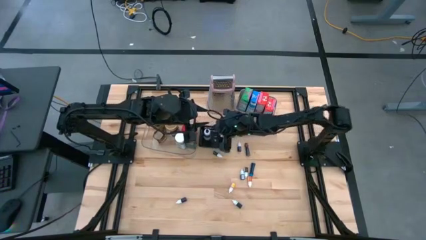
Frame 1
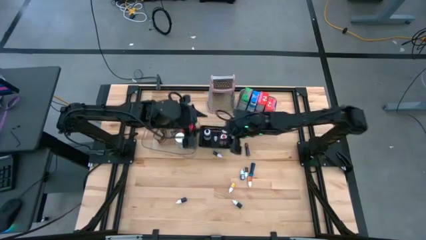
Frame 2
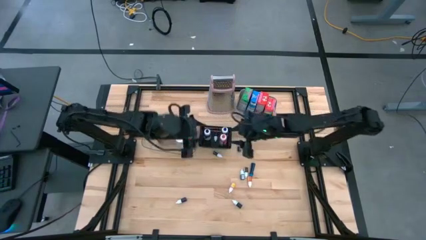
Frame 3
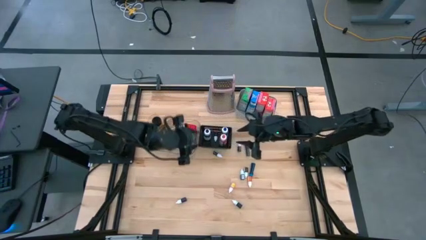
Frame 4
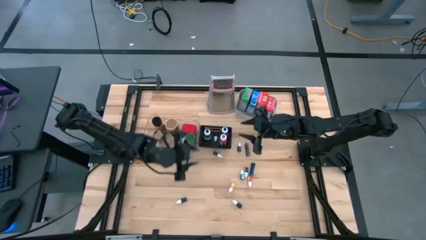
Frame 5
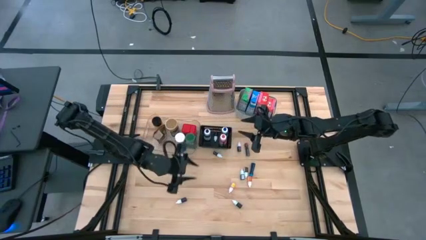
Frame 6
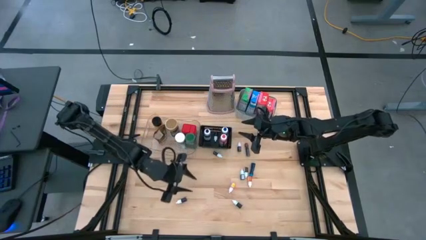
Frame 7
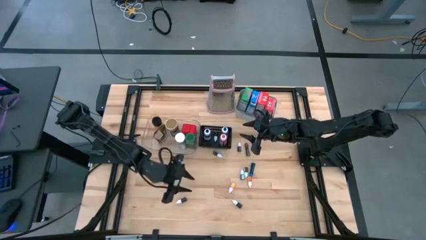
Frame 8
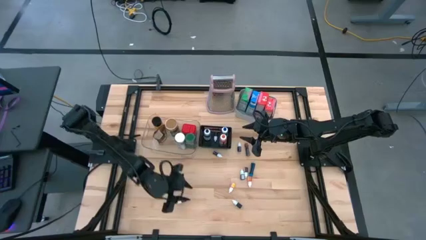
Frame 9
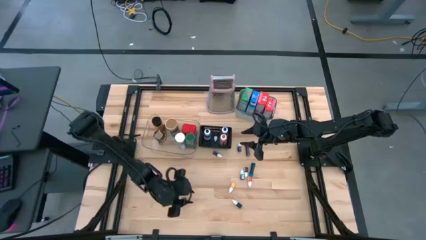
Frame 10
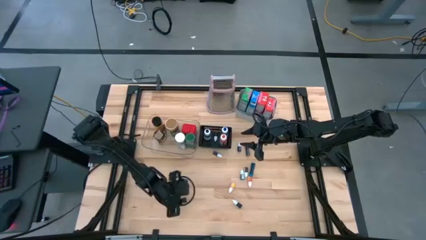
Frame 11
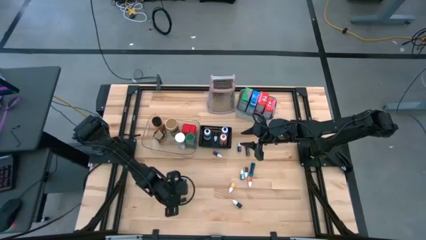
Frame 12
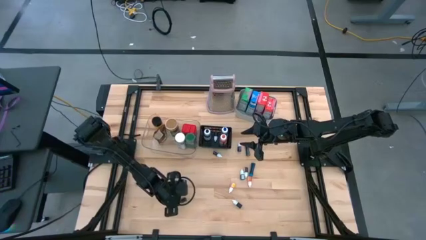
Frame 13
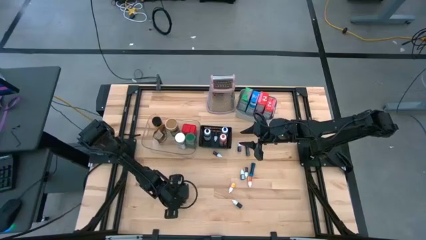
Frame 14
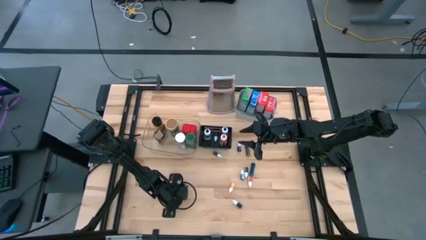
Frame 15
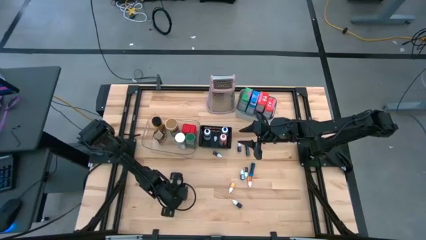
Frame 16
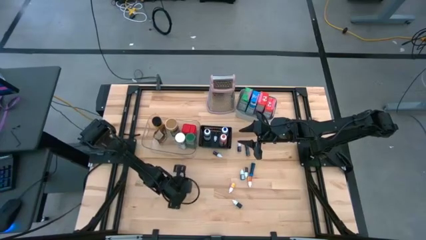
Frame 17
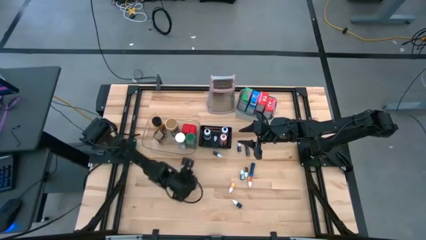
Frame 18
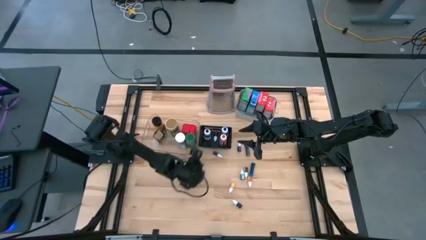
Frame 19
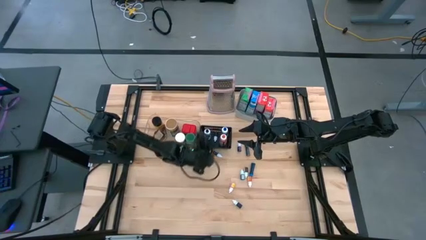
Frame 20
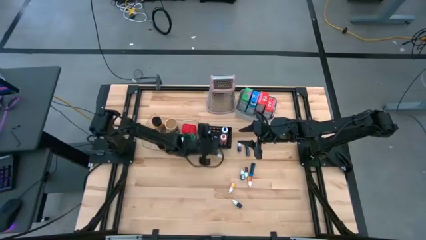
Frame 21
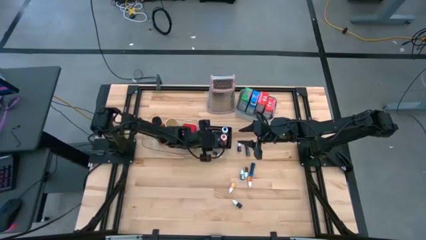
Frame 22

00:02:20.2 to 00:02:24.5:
Task: Pick & Place Kitchen Items
Put the small red food coloring bottle into the black bin

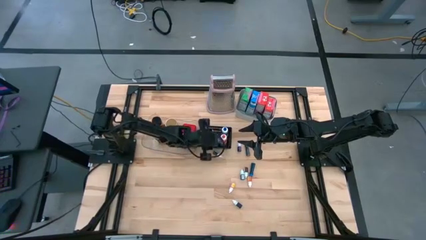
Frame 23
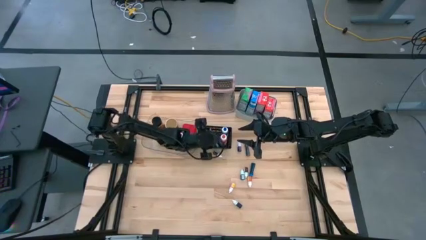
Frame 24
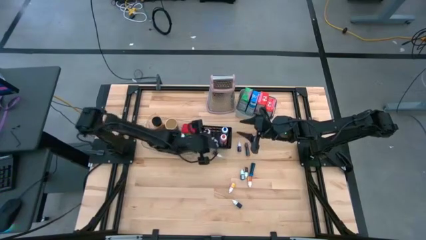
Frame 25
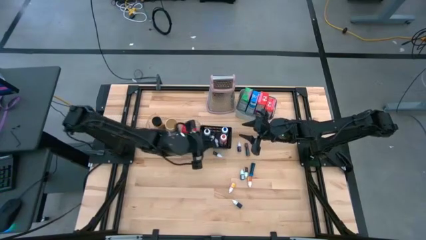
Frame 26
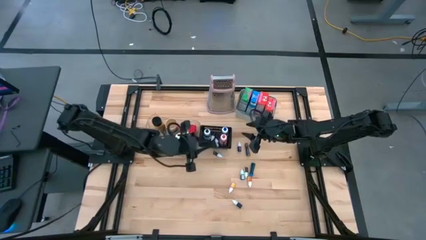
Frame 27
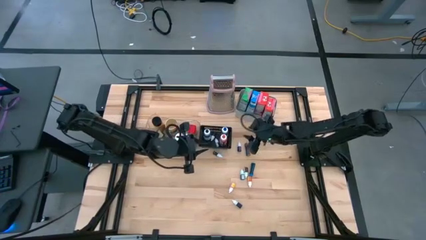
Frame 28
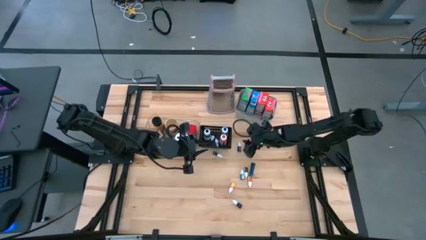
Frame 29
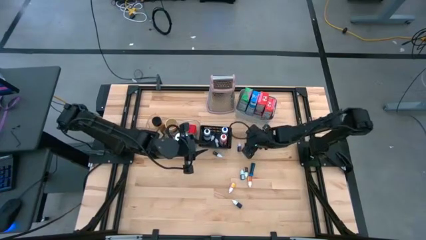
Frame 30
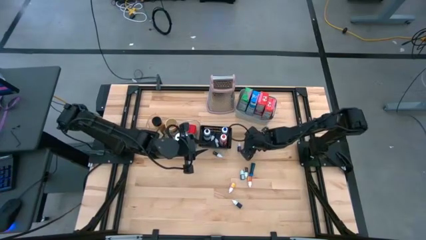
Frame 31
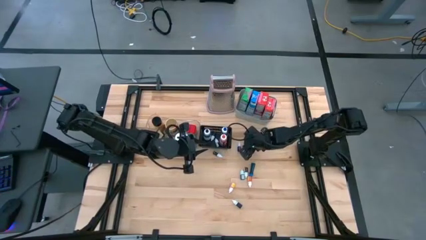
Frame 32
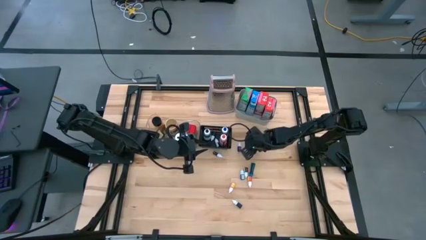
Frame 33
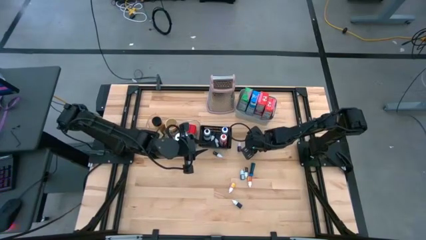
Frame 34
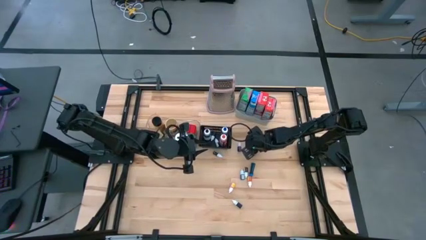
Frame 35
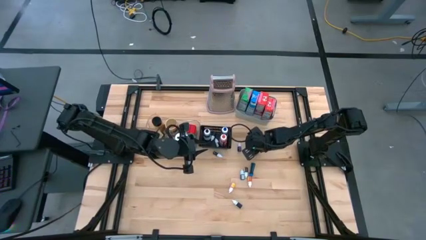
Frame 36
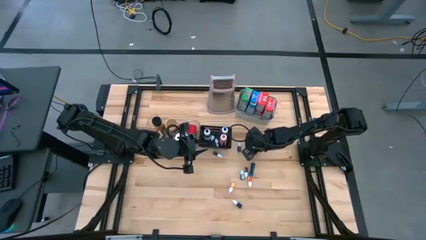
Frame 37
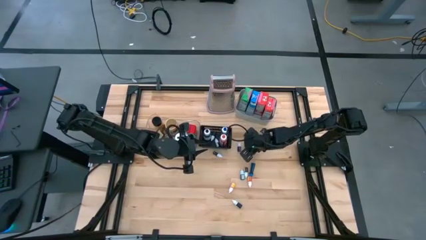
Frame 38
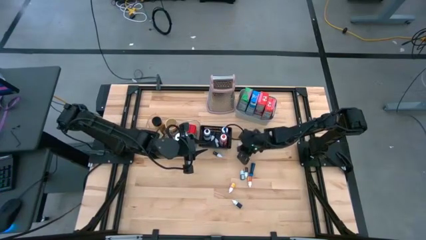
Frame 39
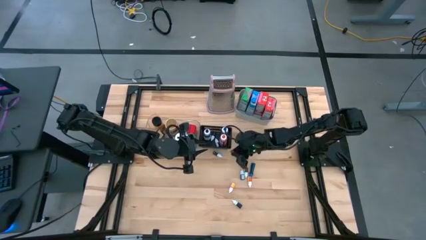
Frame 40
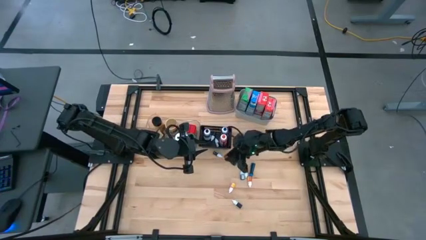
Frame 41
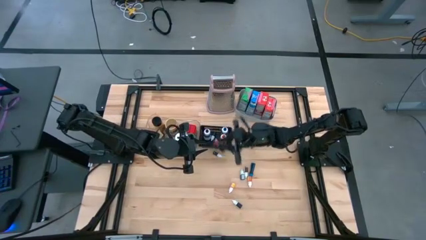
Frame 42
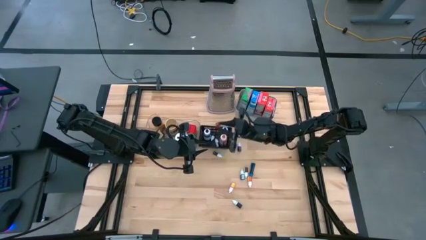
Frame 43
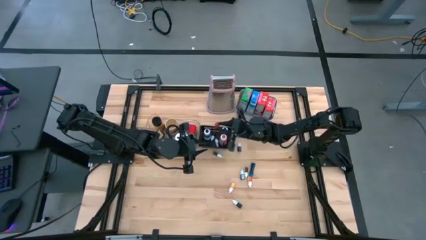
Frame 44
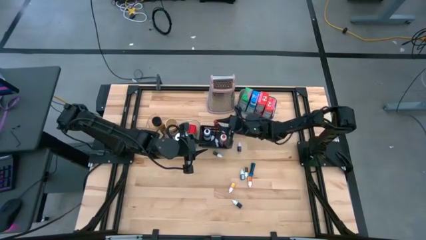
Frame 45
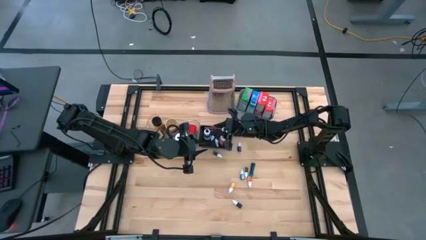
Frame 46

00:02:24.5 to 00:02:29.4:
Put the small red food coloring bottle into the black bin

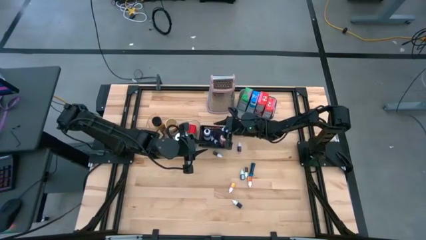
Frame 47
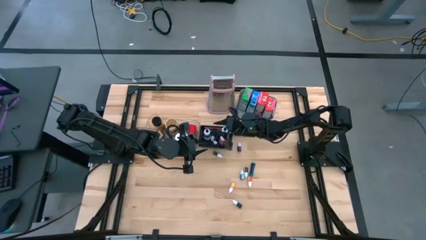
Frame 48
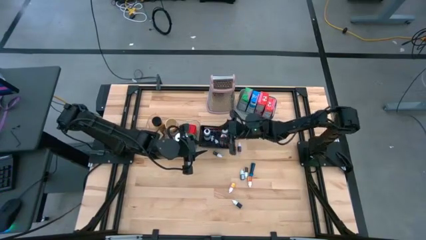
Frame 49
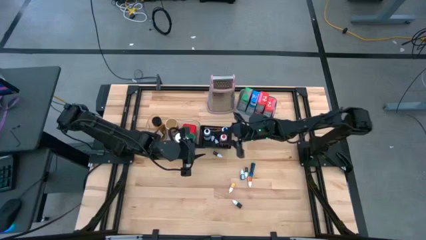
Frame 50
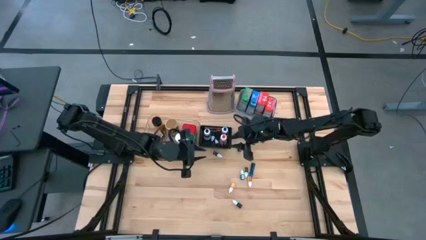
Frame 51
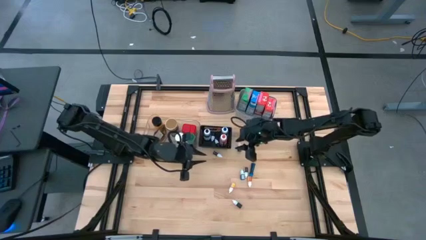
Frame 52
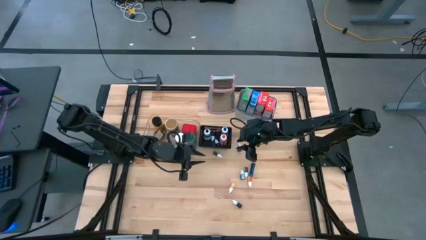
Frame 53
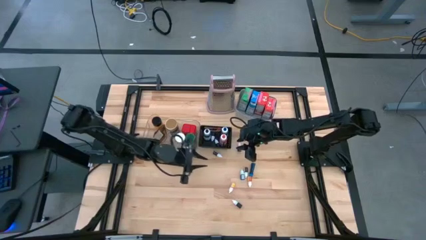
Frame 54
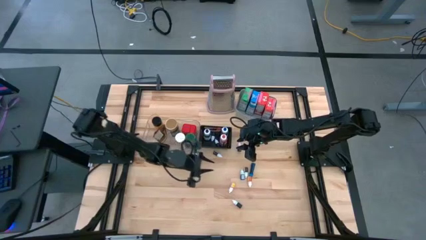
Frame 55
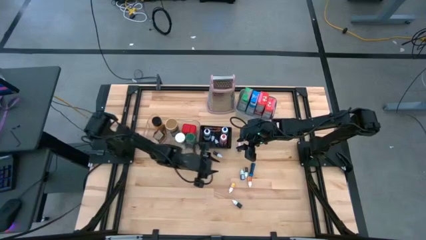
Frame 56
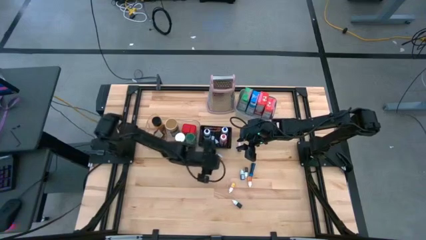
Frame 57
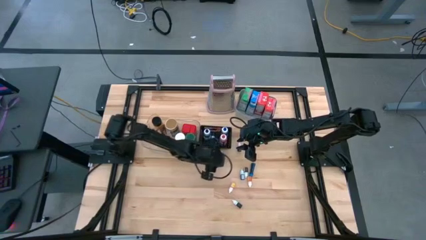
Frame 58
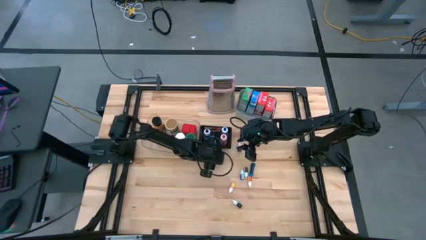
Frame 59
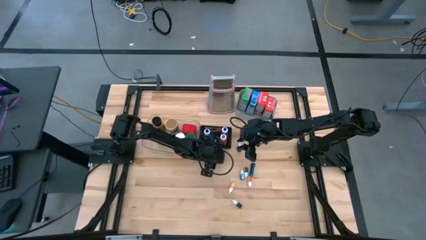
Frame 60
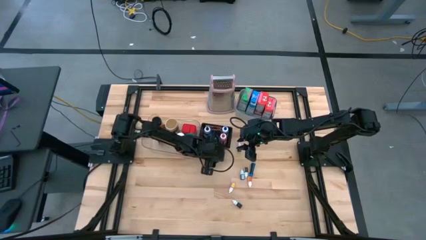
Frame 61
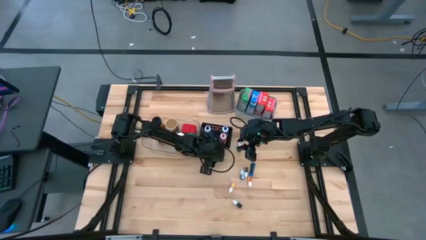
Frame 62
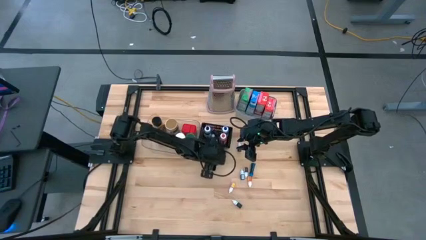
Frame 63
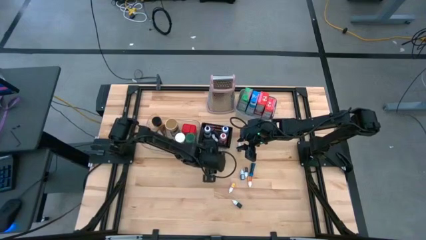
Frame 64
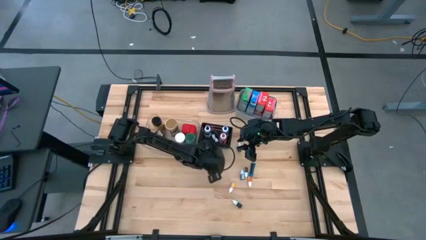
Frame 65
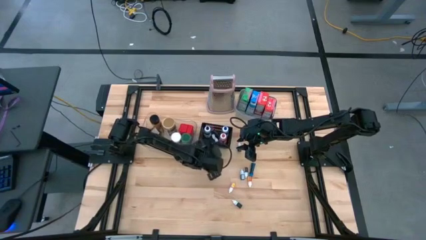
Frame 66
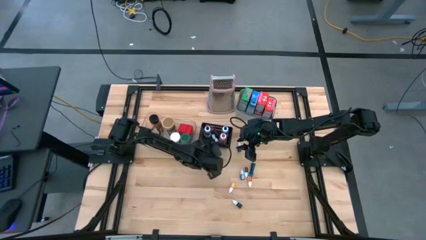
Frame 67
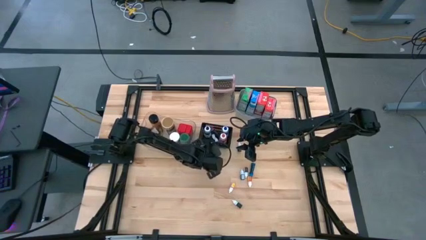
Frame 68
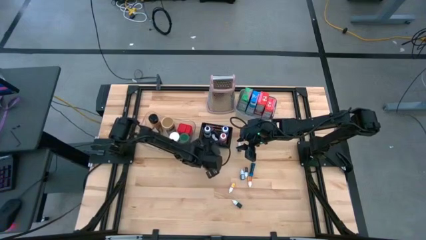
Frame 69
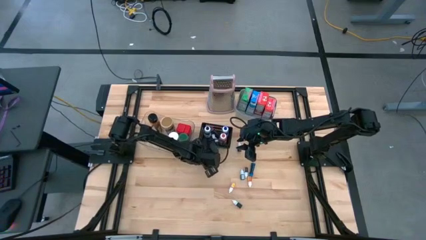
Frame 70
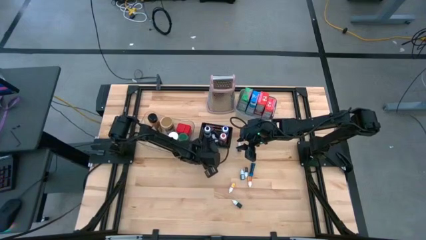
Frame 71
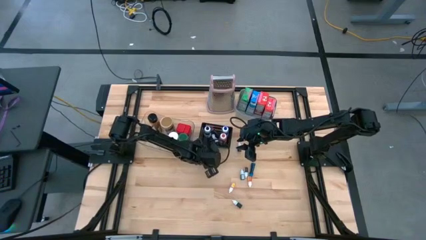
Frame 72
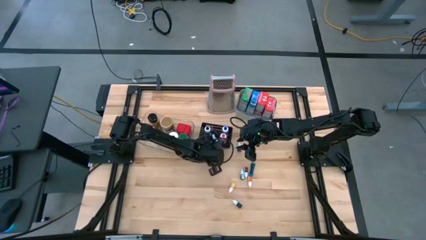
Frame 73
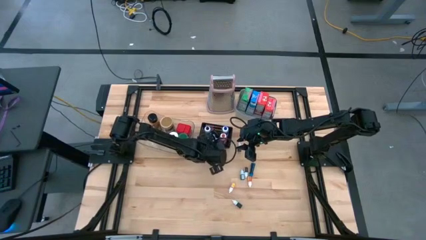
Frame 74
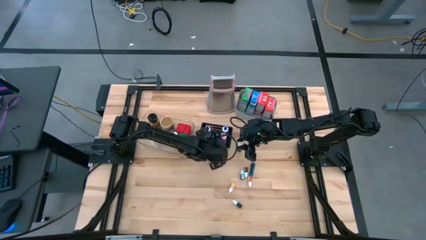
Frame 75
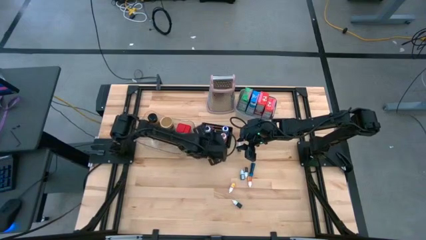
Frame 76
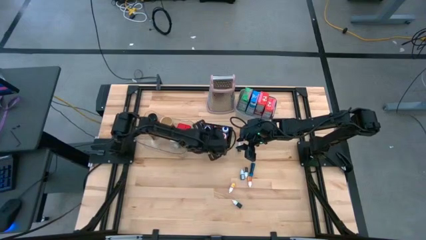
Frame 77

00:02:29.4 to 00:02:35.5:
Put the small red food coloring bottle into the black bin

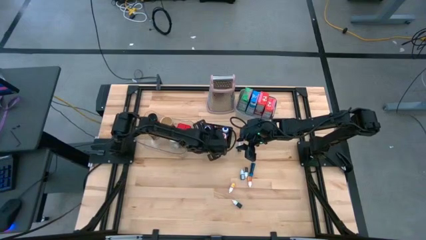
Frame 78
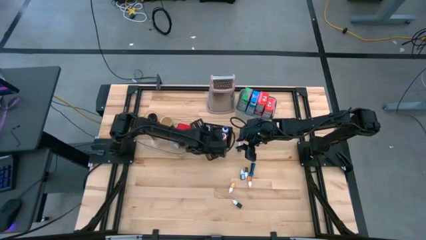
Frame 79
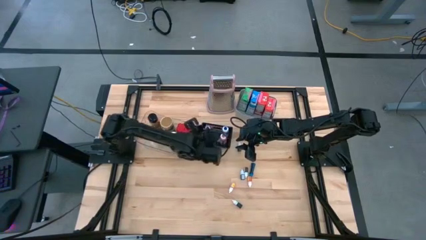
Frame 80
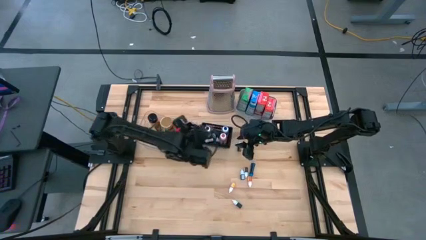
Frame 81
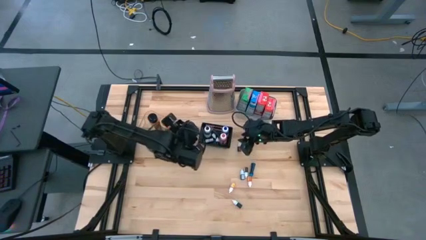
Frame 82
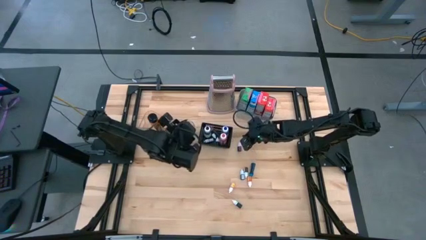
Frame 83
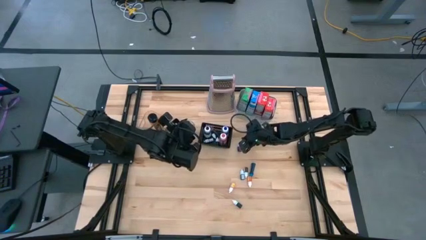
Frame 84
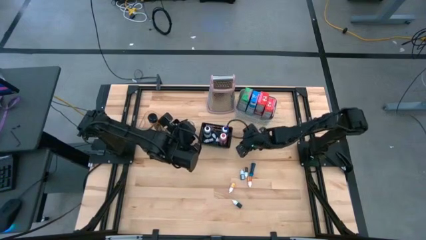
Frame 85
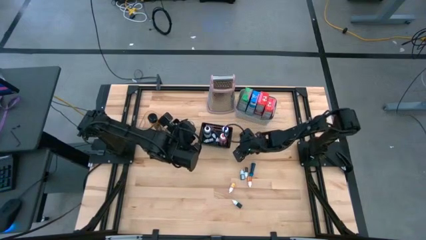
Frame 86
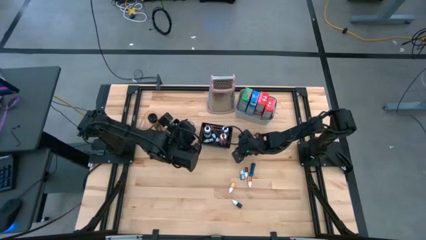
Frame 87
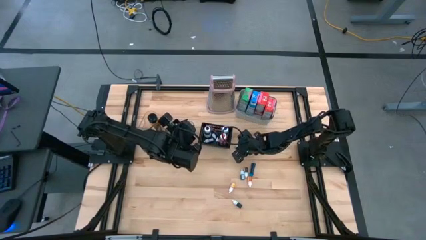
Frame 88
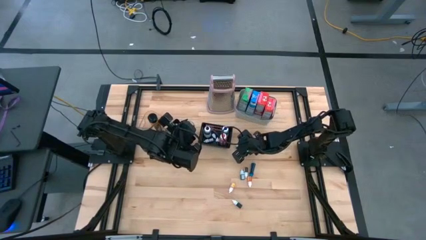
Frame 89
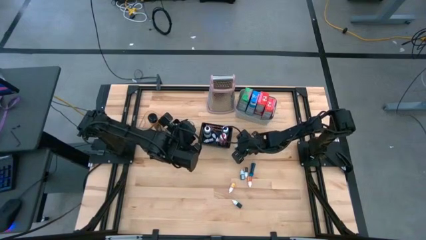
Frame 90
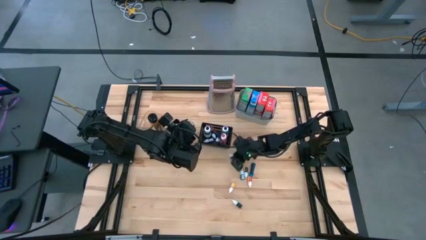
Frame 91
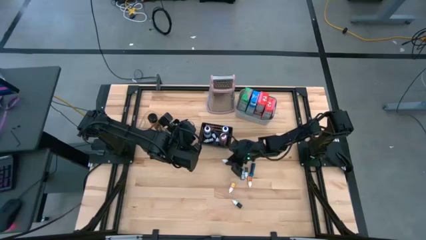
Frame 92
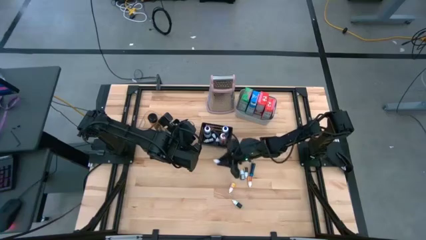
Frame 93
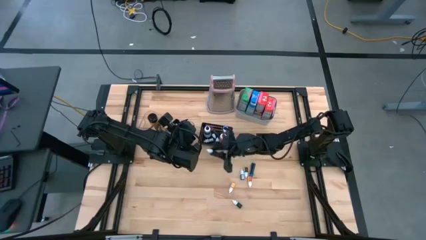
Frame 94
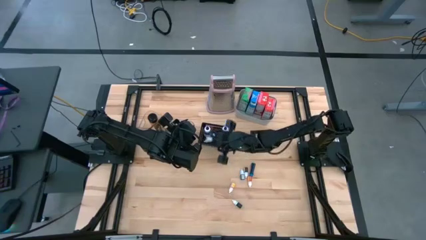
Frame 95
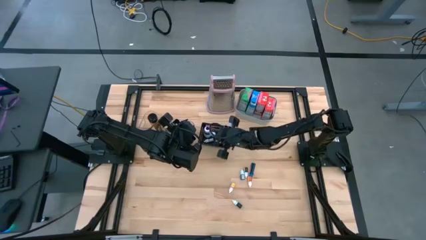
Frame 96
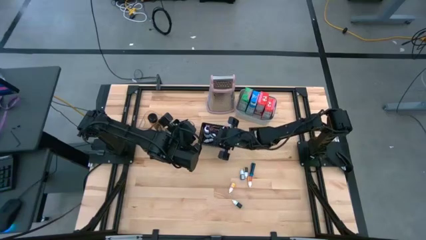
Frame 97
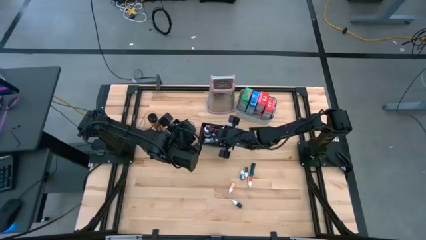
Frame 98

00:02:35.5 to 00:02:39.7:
Put the small violet food coloring bottle into the black bin
